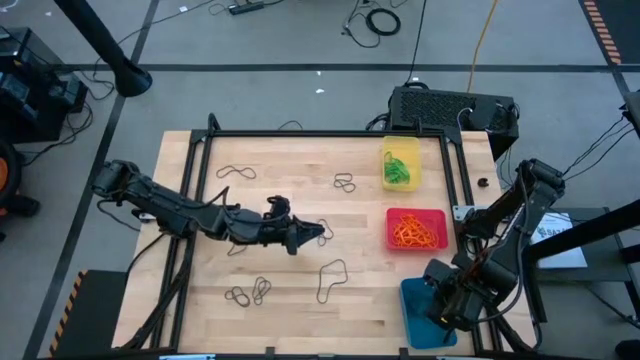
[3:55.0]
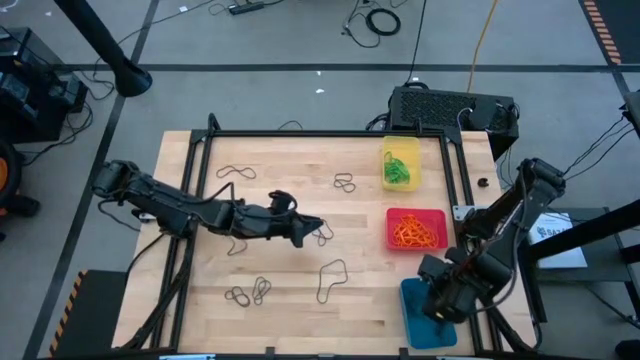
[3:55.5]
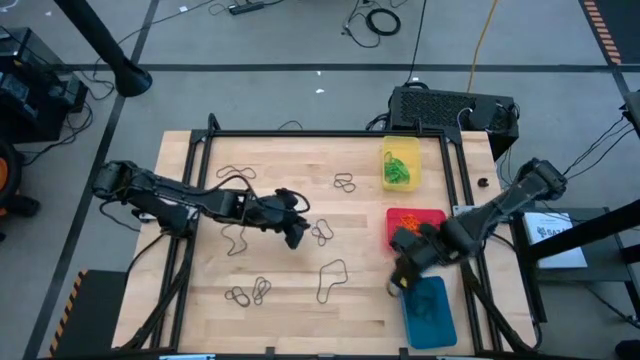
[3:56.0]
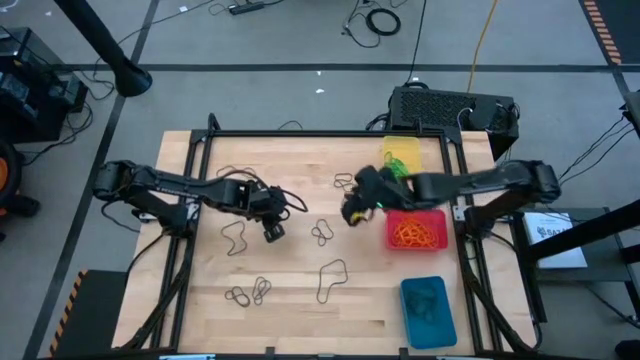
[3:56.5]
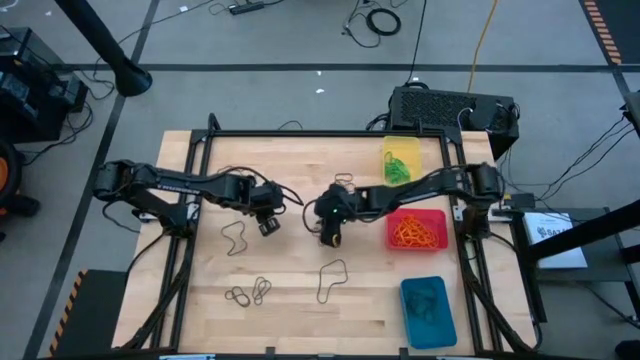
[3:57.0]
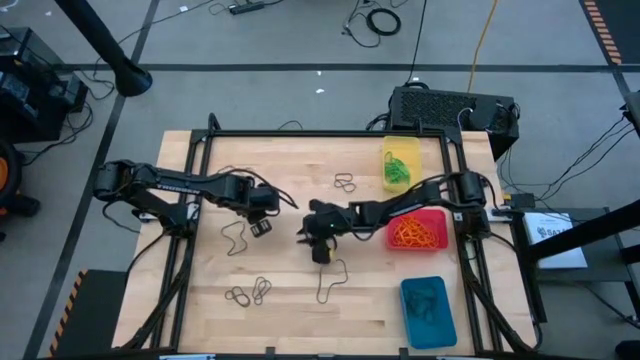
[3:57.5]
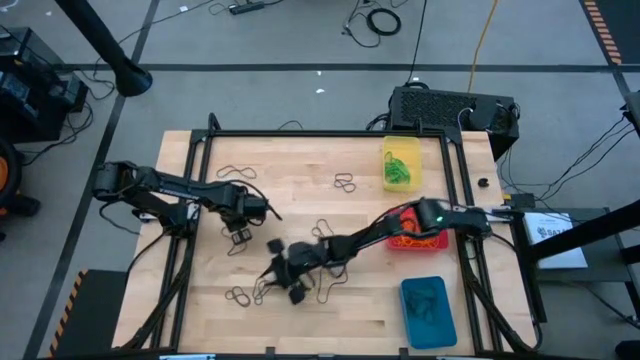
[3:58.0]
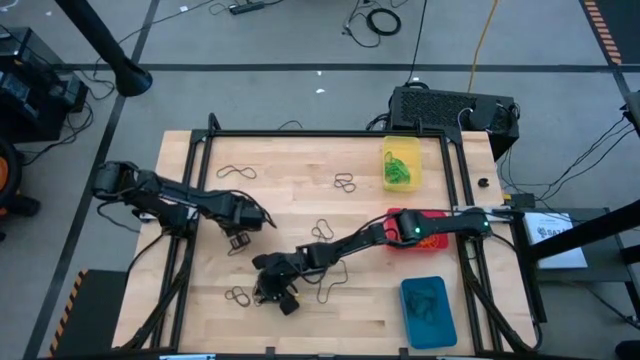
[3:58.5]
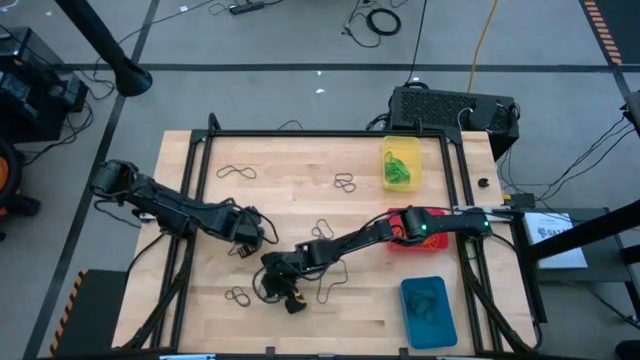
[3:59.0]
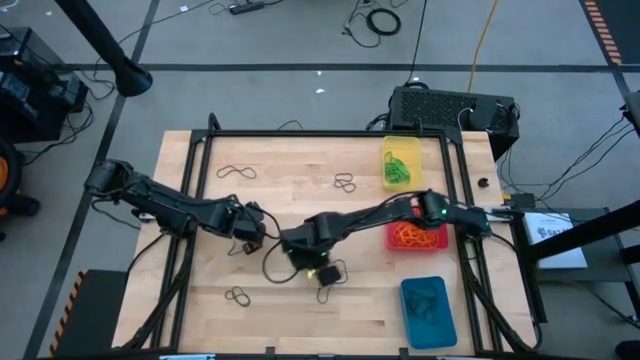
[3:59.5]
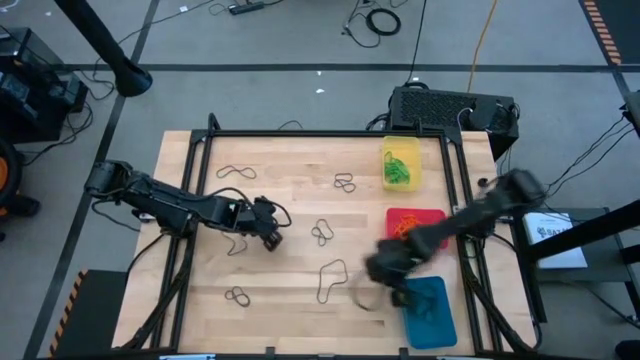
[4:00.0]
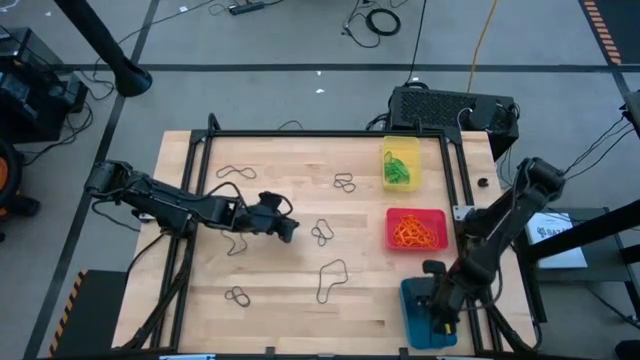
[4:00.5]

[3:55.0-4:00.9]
Task: Sort rubber bands into baskets
Put the violet rubber band into the blue bin

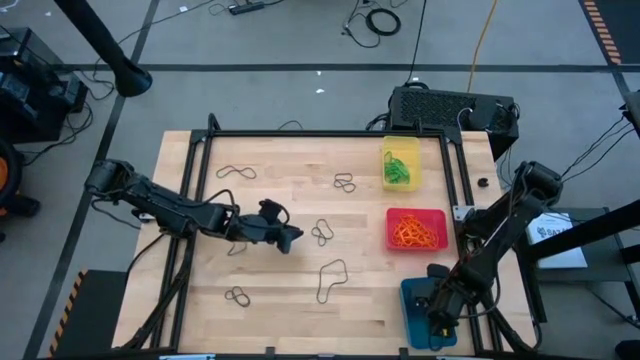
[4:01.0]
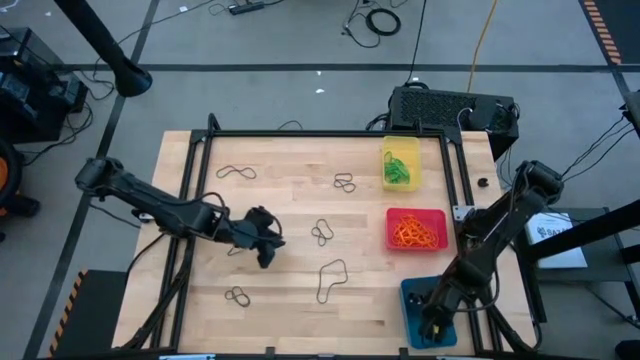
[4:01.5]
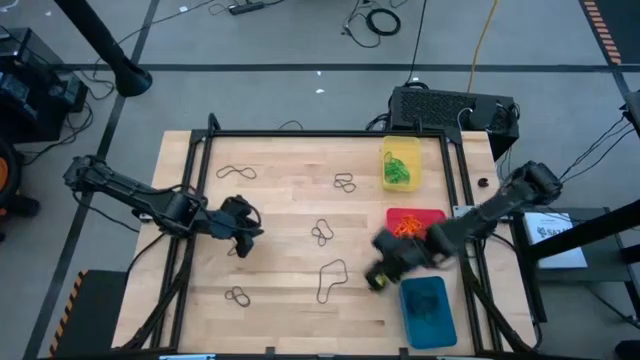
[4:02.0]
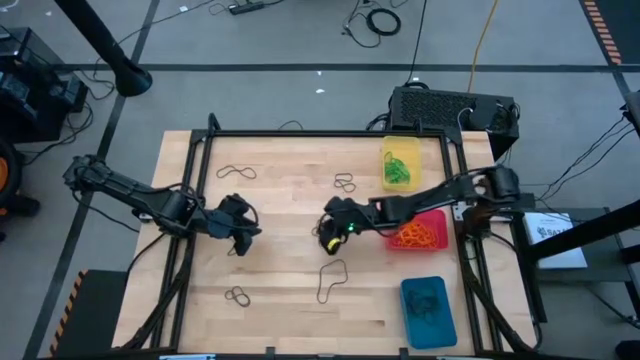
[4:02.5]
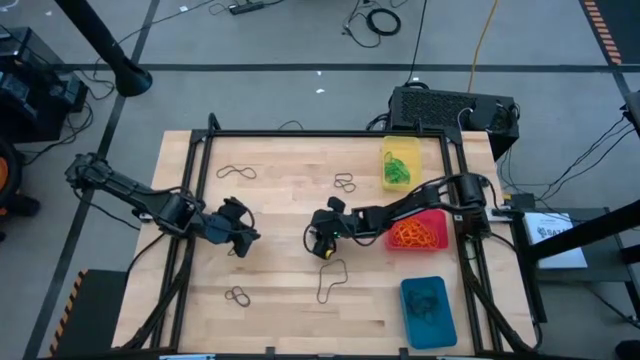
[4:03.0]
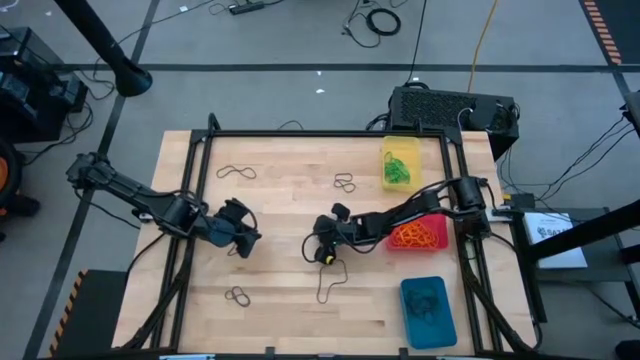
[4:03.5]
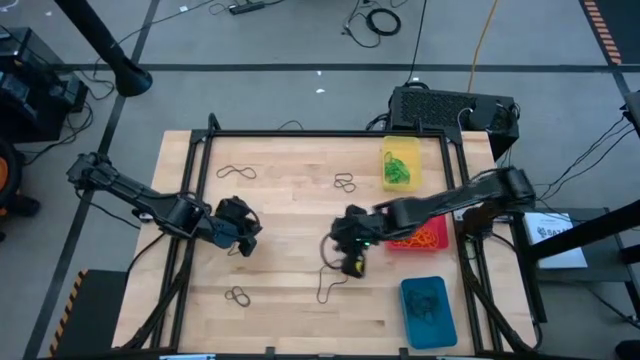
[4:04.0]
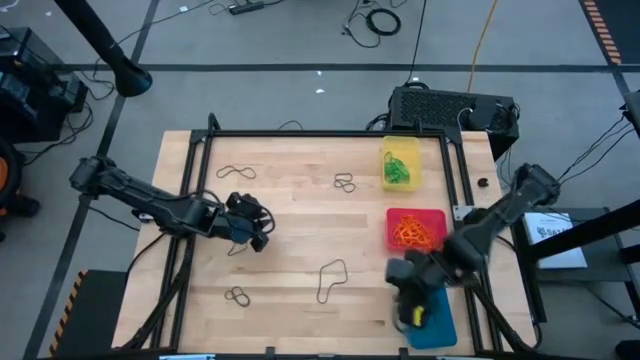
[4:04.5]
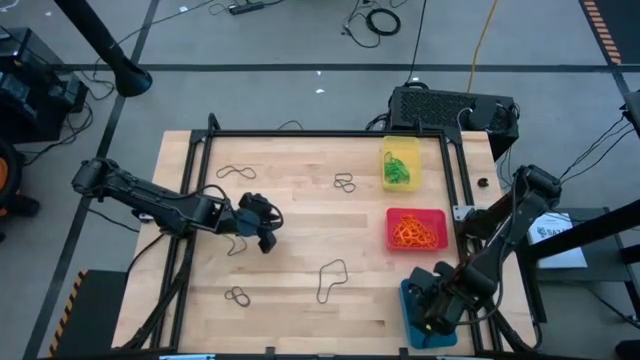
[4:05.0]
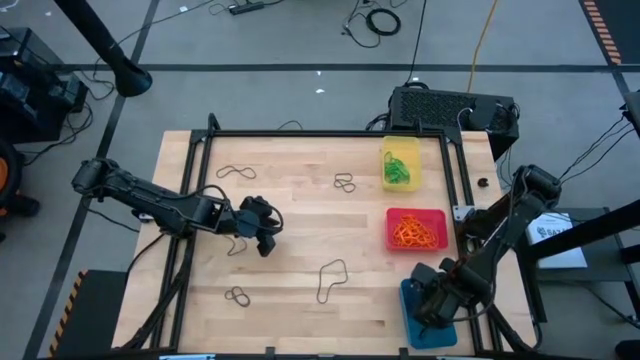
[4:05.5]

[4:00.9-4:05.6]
Put the violet rubber band into the blue bin

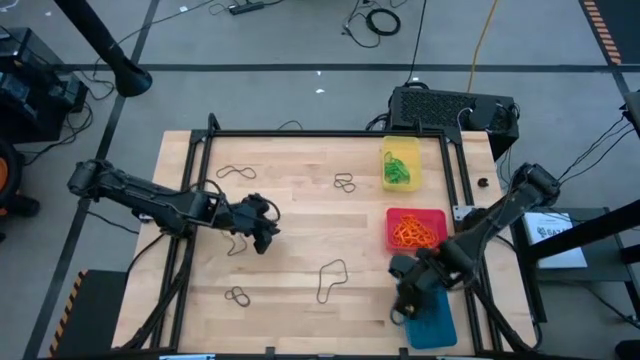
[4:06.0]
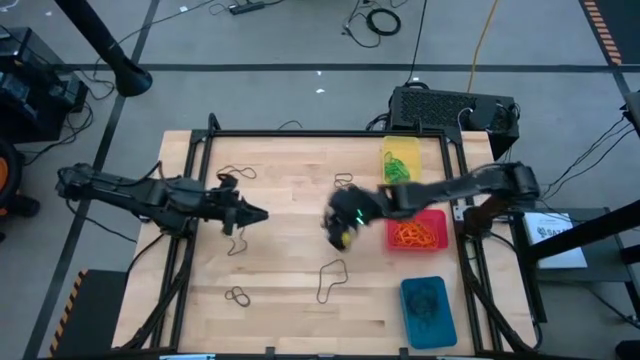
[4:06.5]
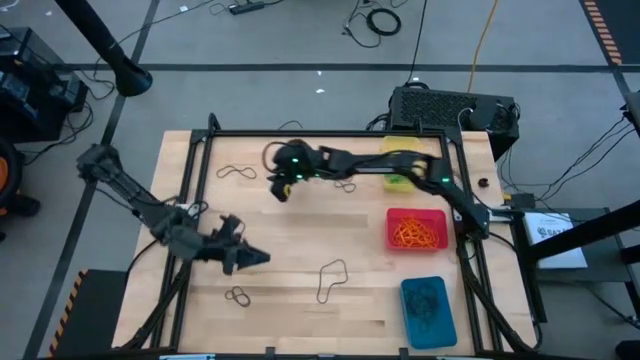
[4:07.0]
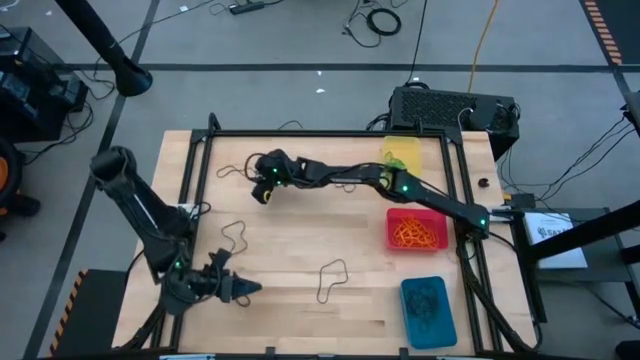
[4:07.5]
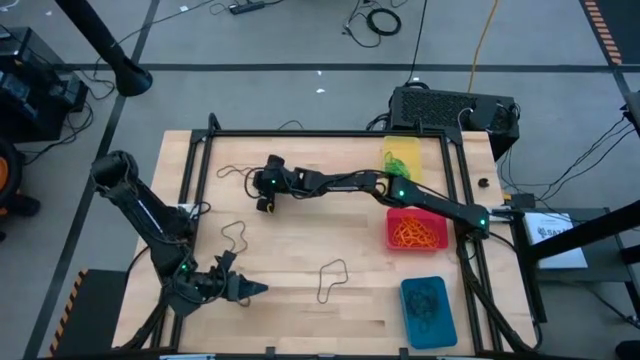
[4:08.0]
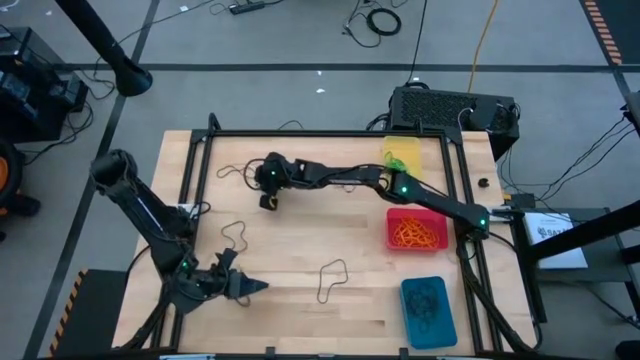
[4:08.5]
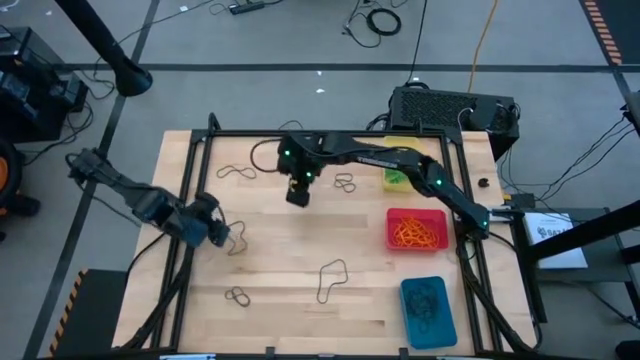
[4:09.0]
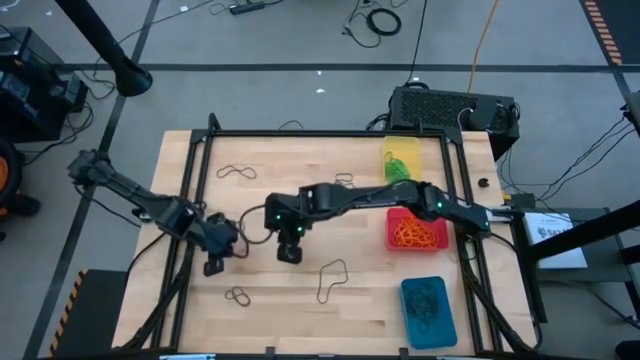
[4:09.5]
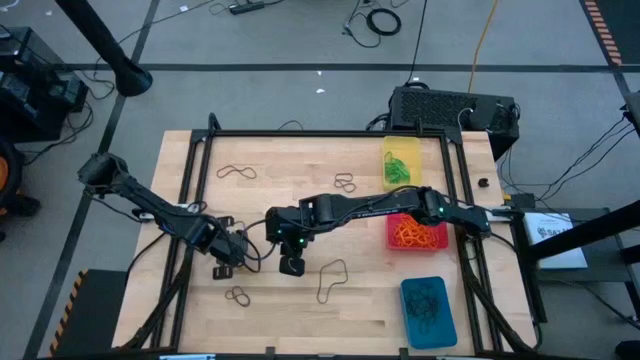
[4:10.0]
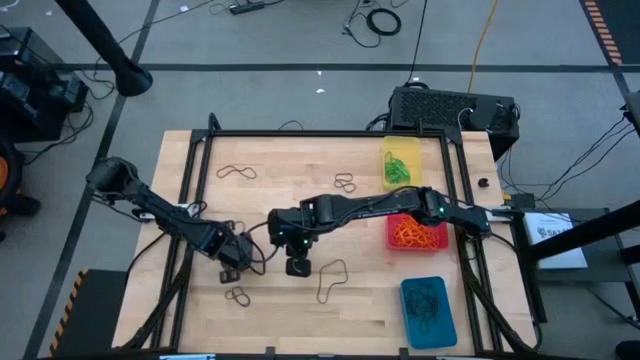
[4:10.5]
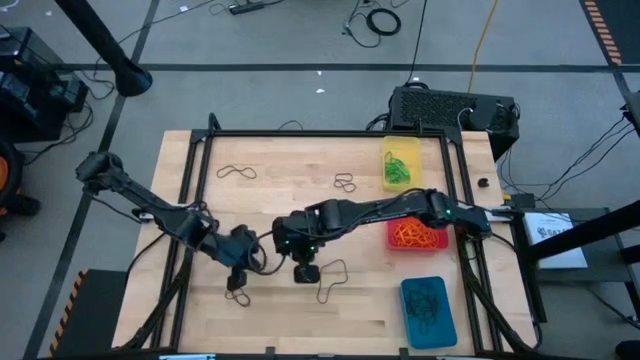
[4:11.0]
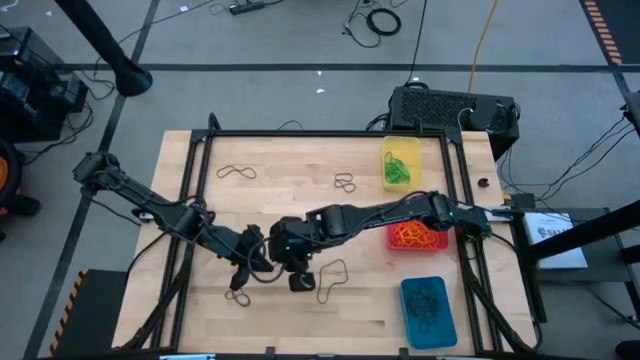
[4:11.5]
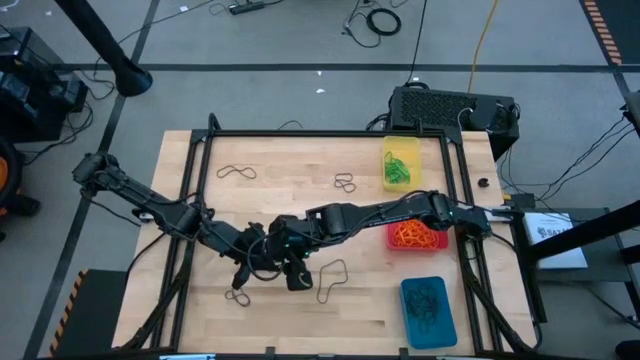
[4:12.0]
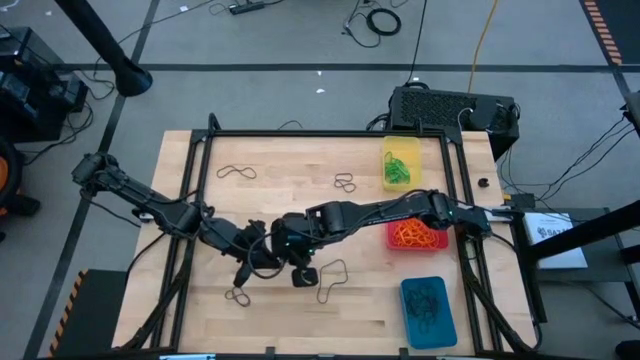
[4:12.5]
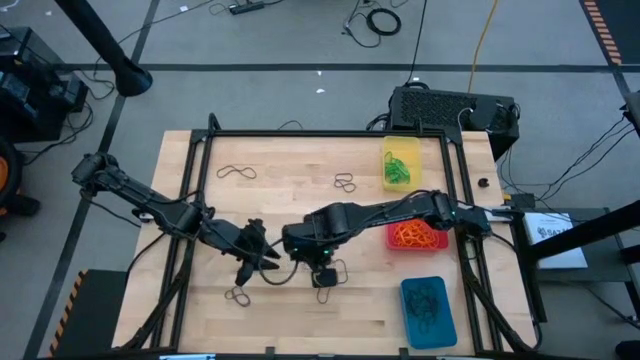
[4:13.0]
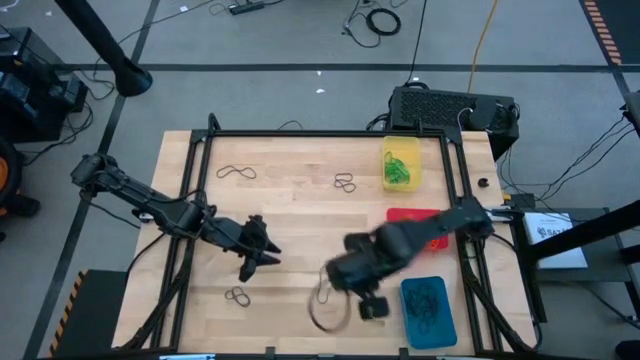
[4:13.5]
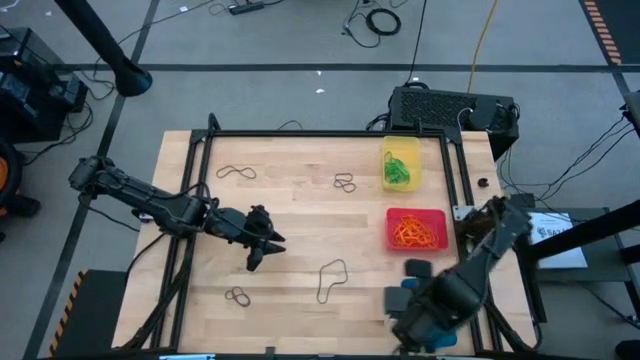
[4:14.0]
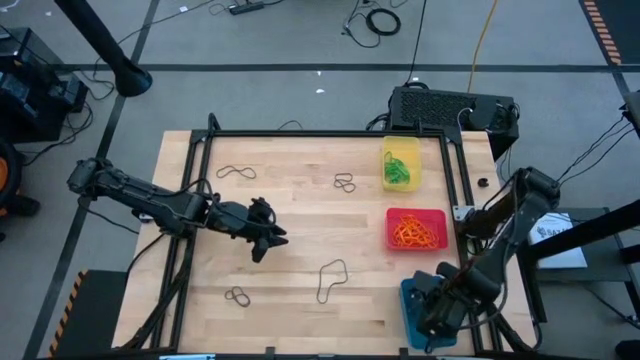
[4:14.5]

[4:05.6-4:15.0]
Put the violet rubber band into the blue bin
